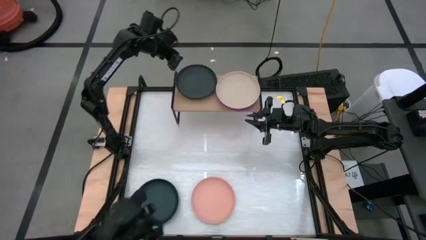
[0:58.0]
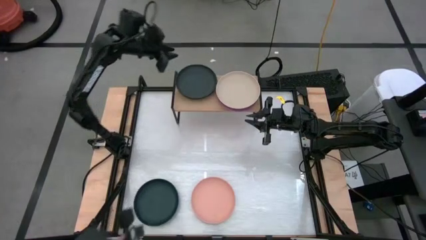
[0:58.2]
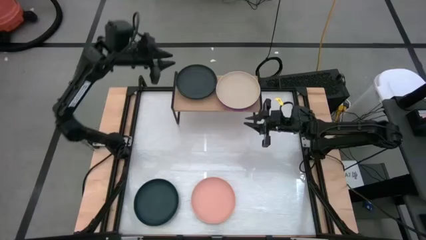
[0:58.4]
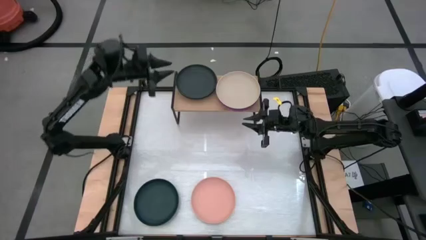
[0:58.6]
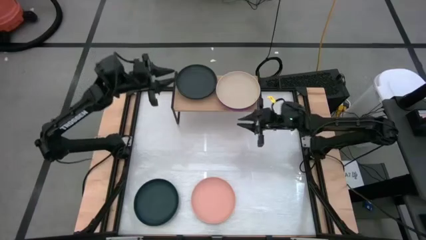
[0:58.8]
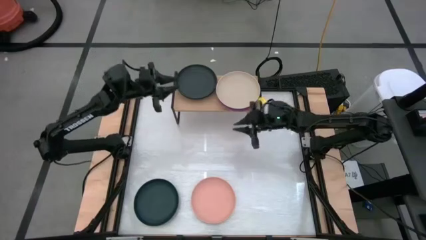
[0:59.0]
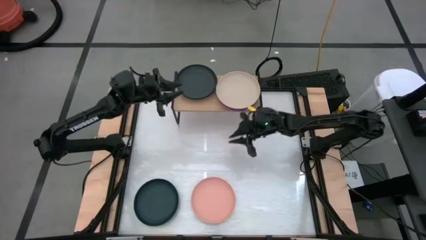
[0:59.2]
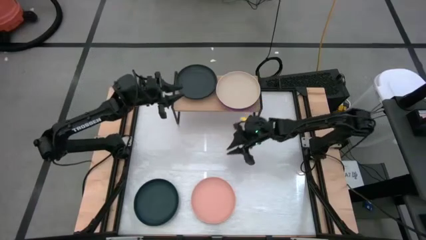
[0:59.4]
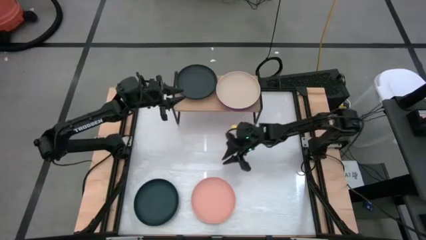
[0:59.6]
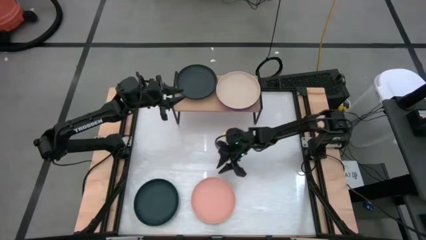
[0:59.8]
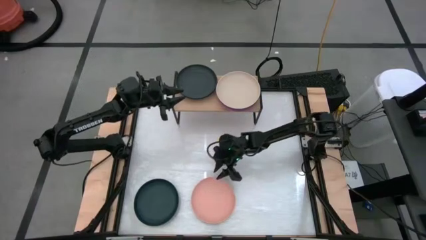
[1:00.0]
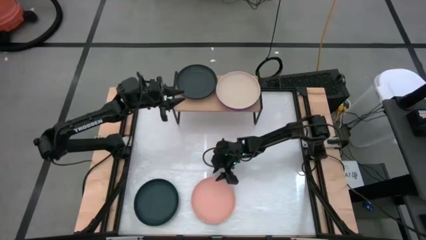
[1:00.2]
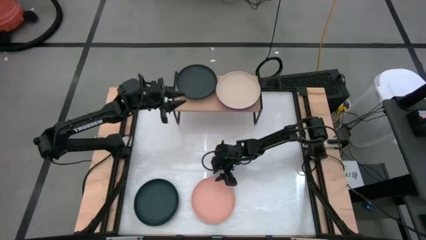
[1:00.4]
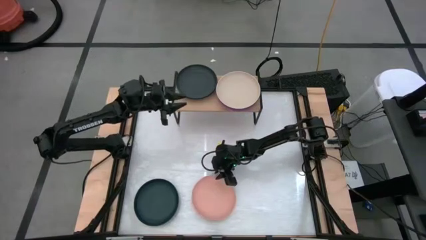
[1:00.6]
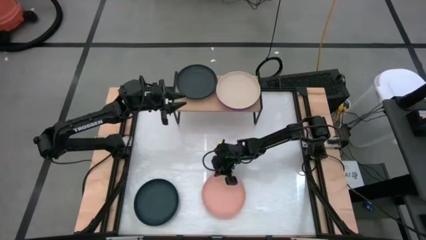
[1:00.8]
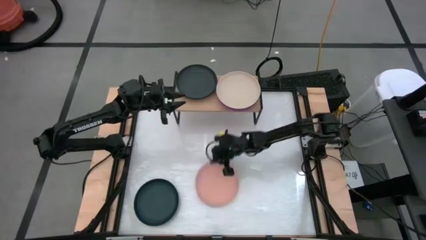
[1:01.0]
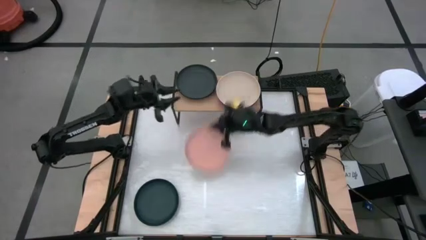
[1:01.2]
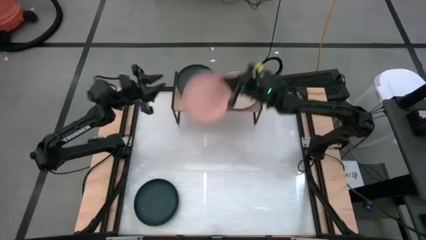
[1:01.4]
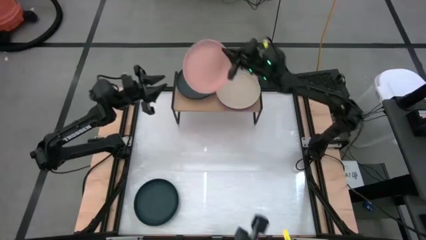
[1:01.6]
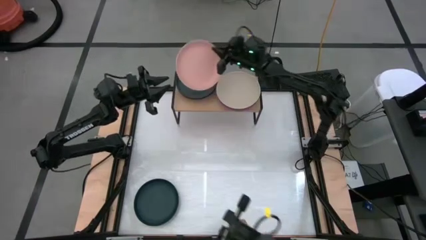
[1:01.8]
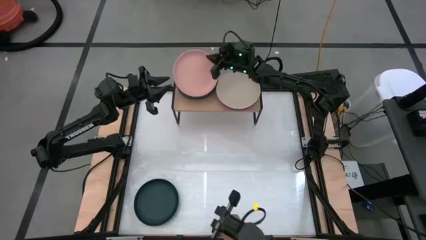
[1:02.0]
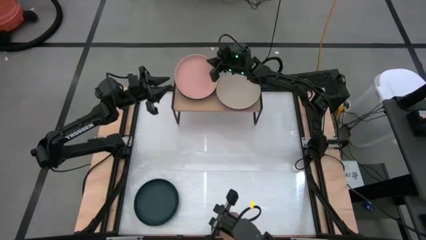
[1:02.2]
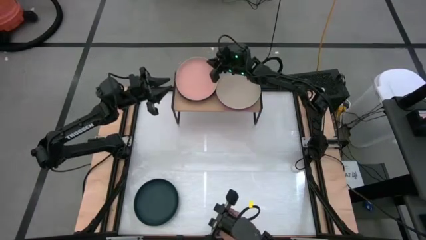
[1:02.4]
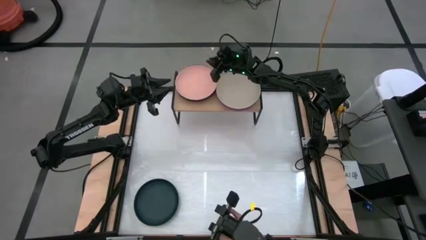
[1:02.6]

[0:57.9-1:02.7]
Task: Place and stack plates onto a shelf
Stack the light orange plate on top of the black plate on the shelf

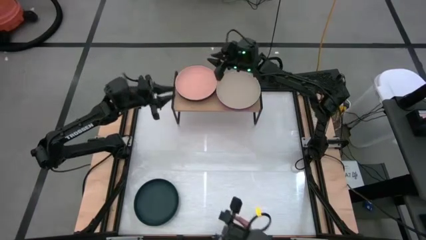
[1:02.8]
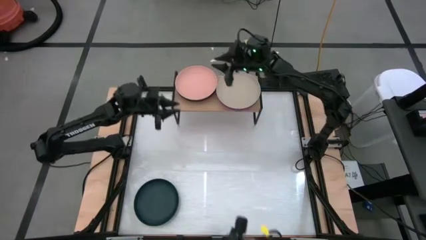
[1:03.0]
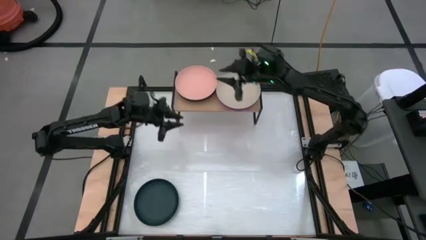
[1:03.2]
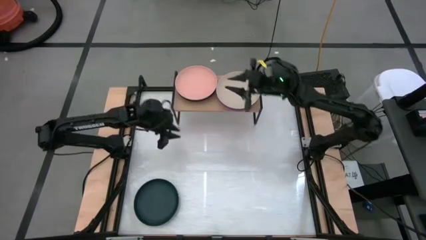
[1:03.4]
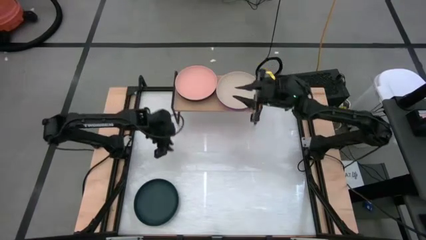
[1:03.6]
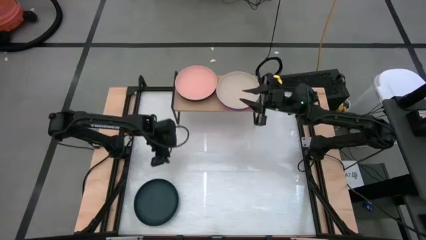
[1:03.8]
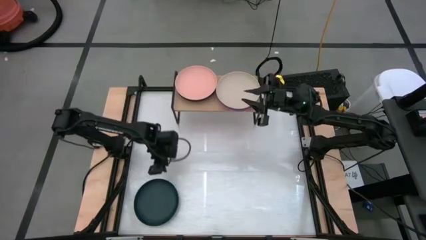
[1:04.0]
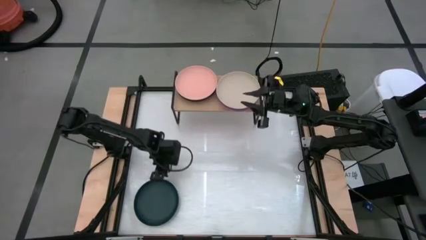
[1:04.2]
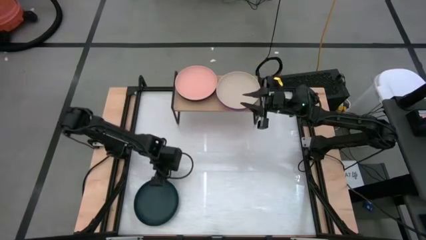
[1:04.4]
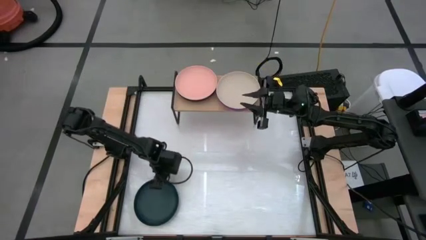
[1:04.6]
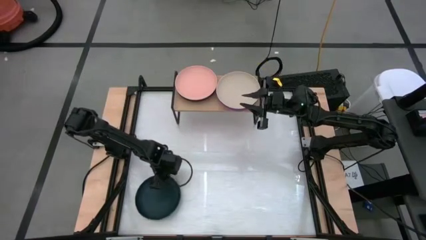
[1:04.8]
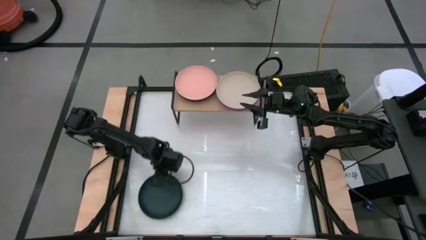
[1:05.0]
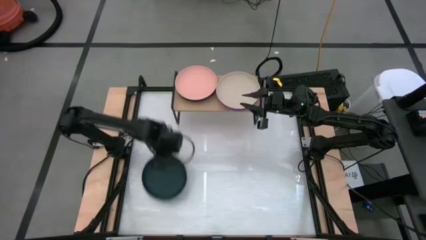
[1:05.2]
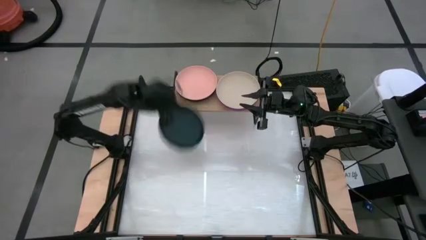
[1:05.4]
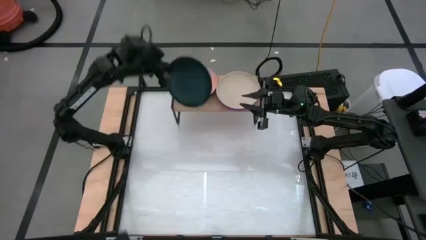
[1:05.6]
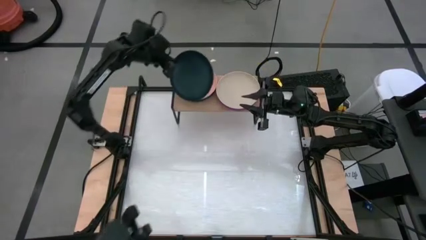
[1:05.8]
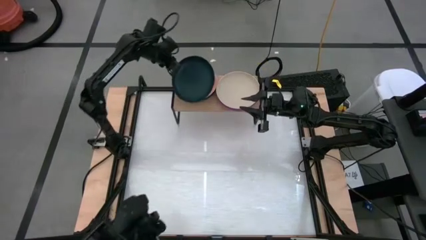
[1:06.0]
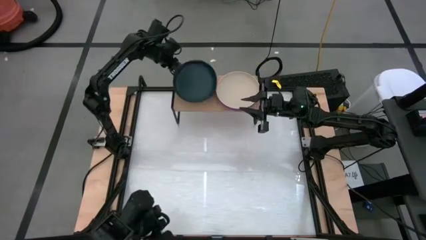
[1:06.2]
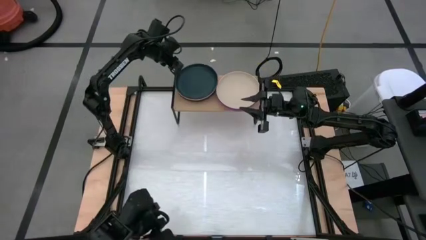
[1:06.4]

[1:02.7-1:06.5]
Stack the dark green plate on top of the light orange plate on the shelf

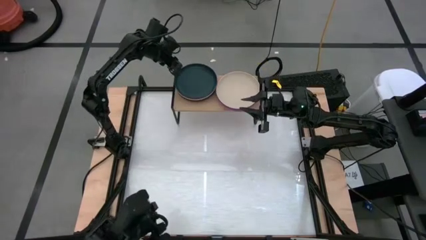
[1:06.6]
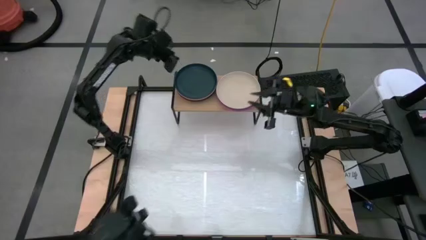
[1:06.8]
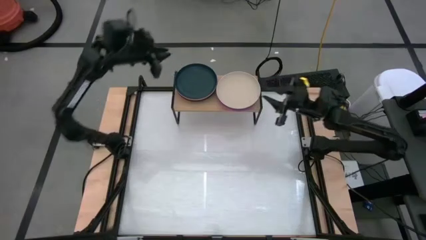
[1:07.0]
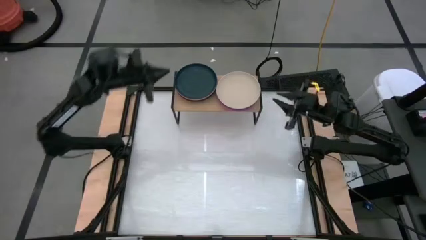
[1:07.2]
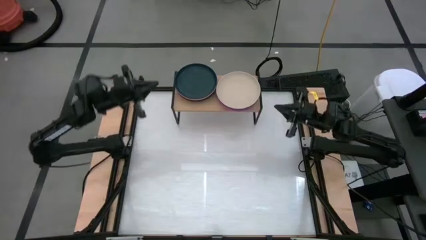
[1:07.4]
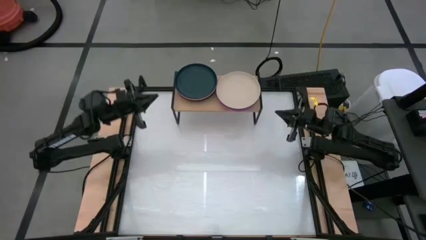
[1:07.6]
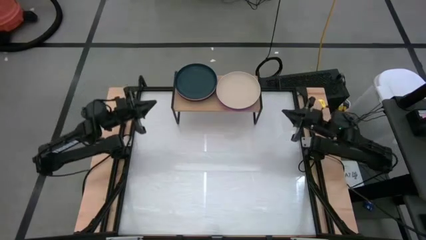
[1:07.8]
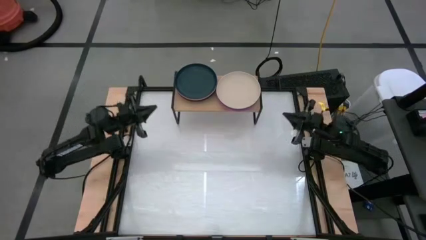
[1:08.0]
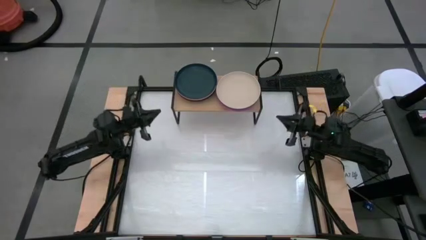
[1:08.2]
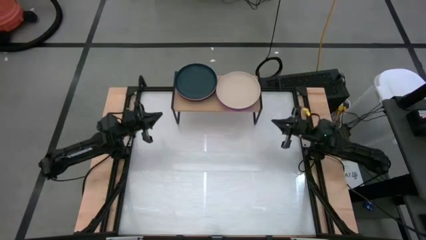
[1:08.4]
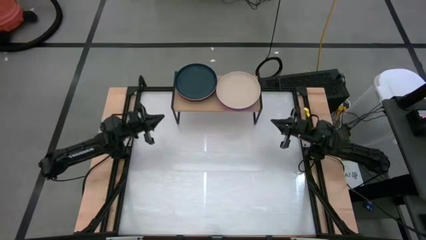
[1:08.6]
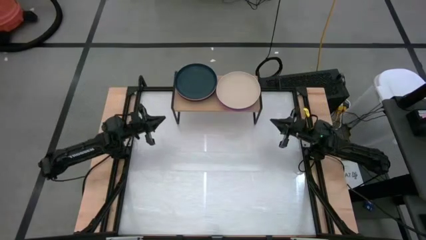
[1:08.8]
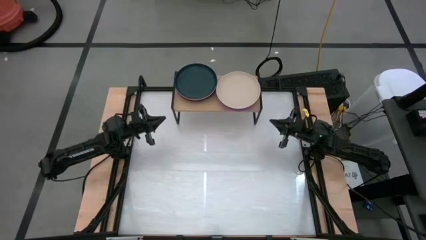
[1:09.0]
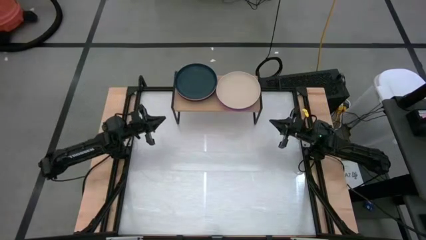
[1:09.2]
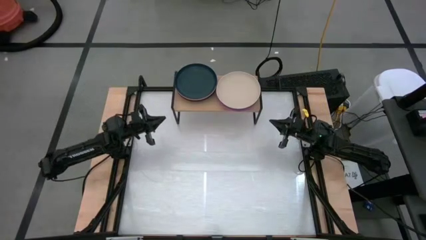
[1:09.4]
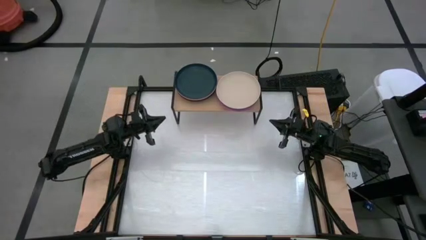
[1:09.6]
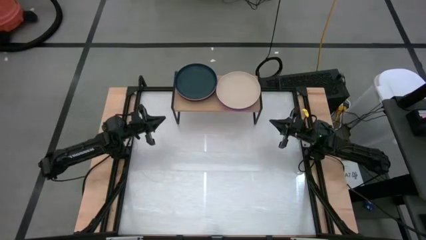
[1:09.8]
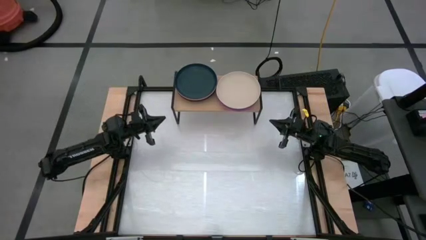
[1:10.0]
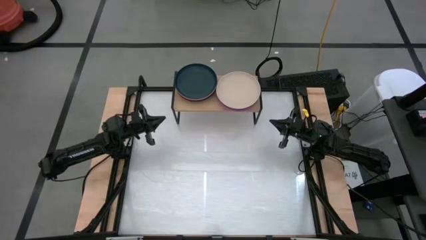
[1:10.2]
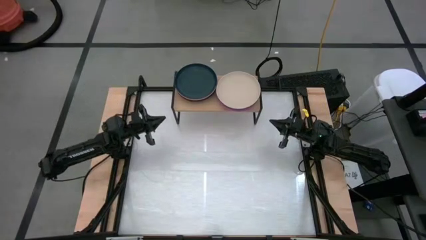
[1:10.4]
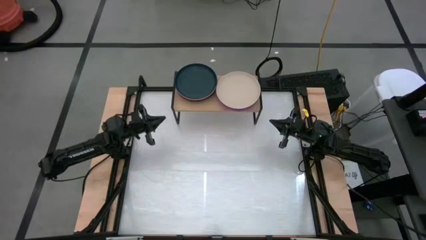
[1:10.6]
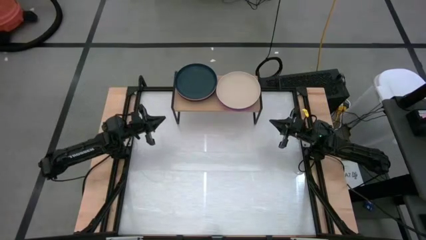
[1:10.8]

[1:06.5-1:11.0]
Return to Home Position

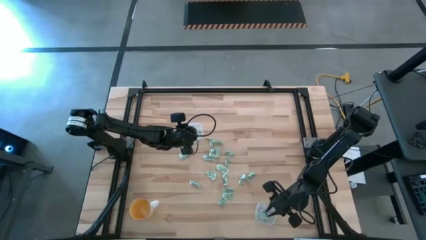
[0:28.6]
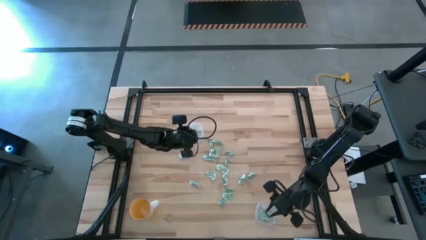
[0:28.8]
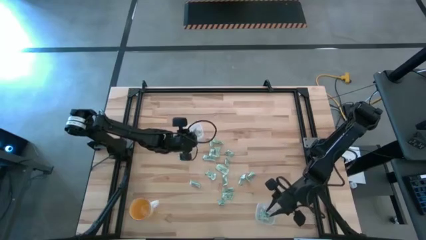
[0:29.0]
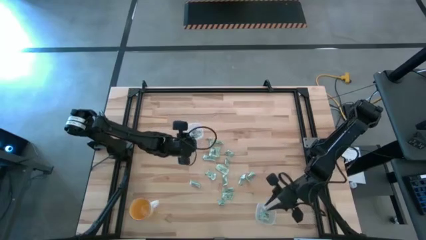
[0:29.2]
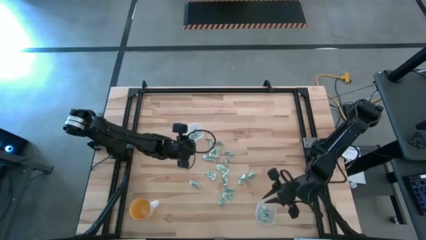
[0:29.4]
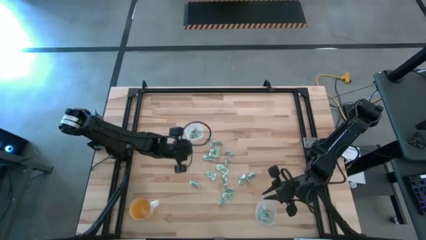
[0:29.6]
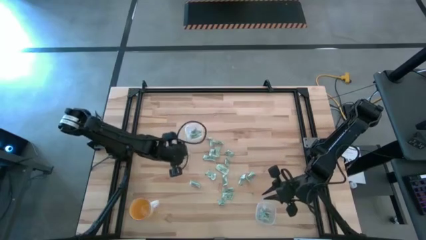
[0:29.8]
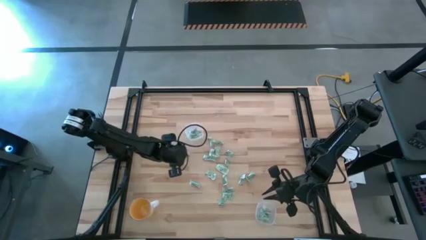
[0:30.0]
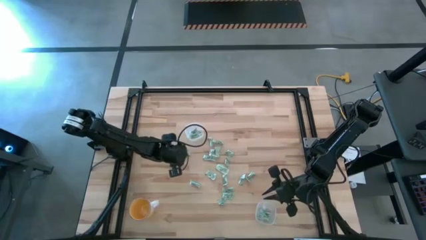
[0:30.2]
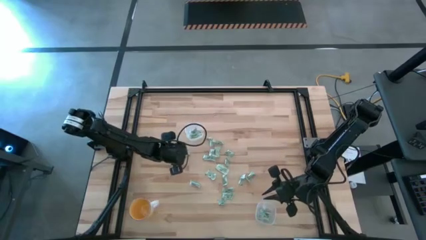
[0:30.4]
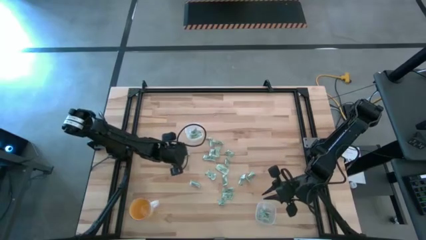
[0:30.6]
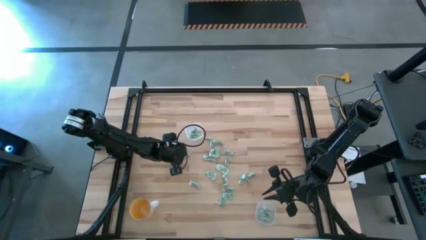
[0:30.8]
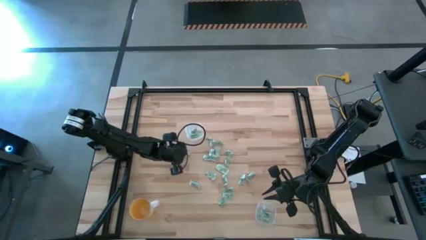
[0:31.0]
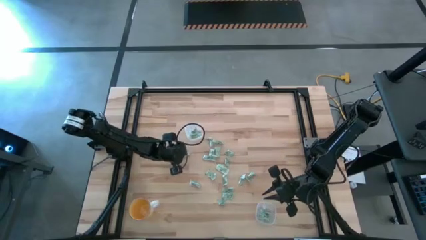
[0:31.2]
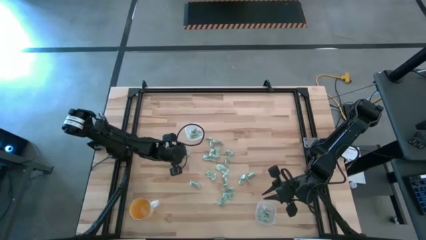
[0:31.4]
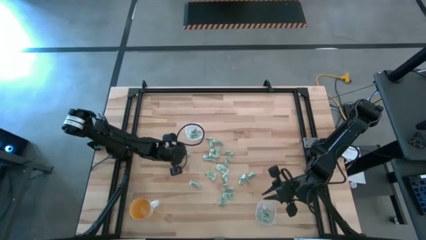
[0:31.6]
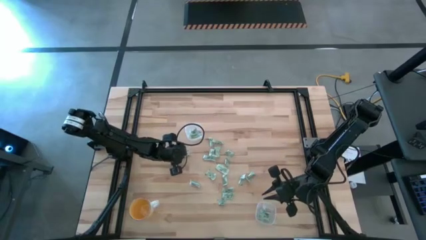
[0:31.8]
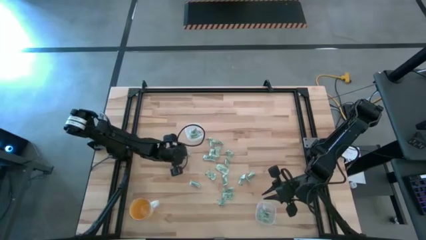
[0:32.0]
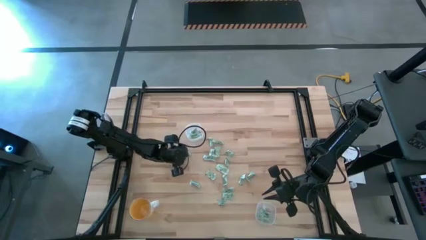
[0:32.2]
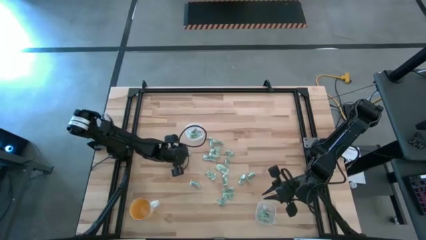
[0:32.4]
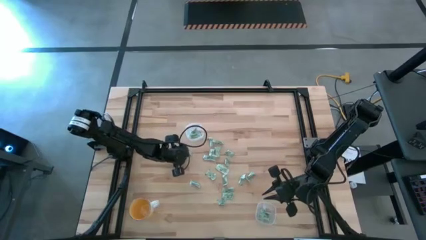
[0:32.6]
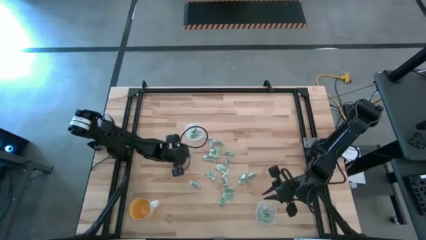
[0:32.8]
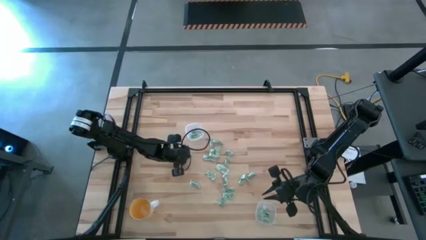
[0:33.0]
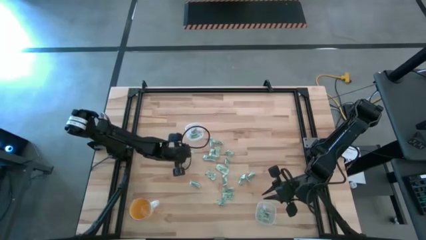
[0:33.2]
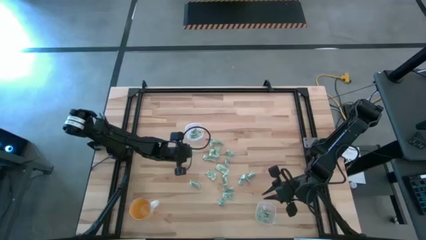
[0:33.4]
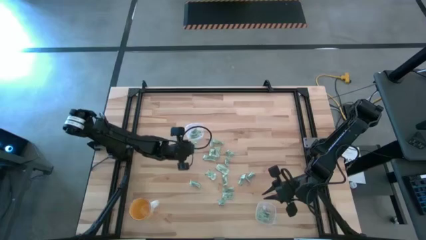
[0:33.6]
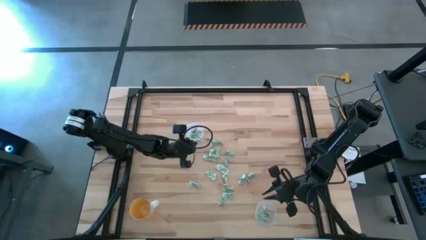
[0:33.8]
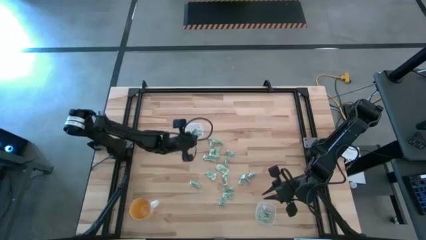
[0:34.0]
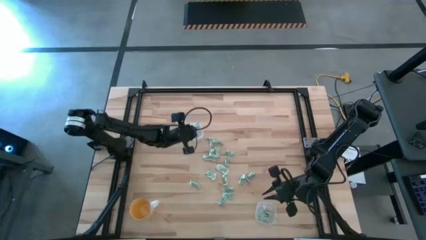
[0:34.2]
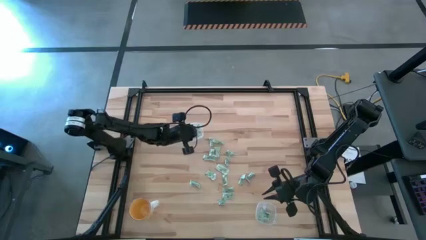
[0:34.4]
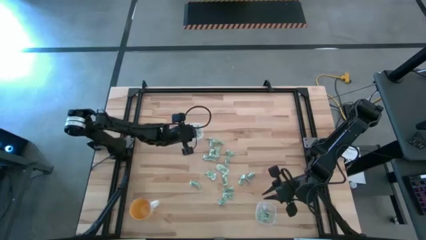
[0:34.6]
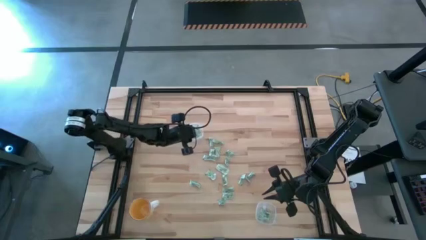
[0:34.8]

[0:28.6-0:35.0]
Task: Pick and place Stevia / Truvia into bins
Put the stevia packet into the top transparent container
